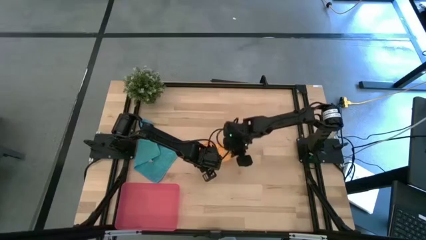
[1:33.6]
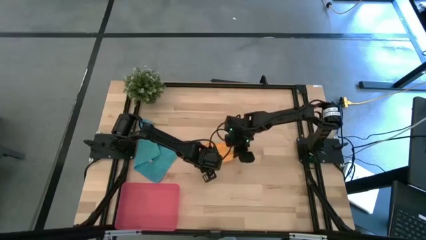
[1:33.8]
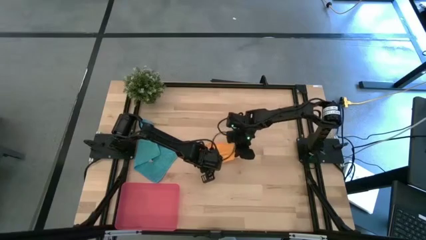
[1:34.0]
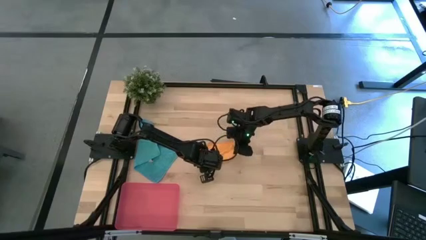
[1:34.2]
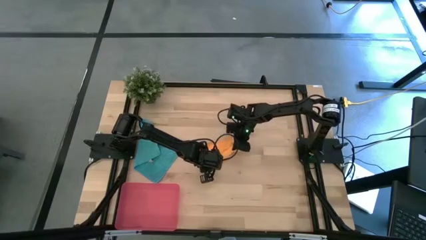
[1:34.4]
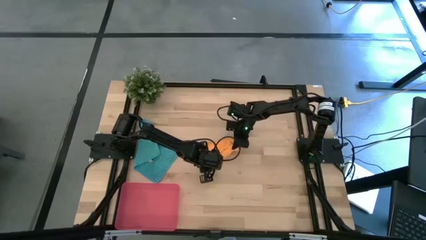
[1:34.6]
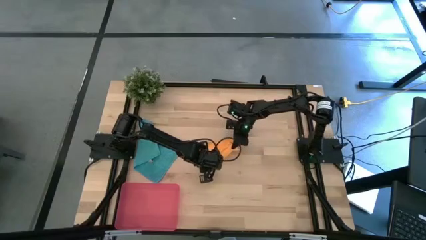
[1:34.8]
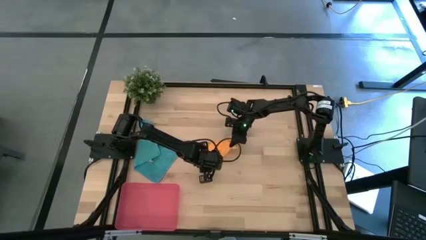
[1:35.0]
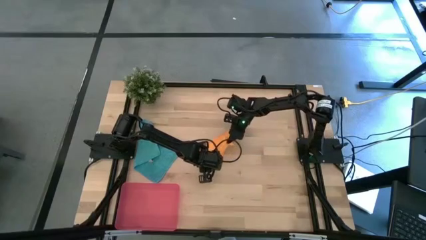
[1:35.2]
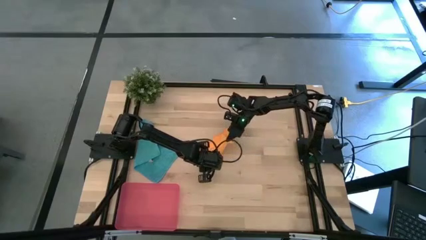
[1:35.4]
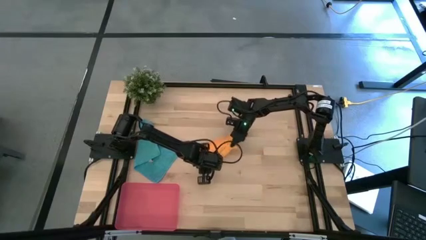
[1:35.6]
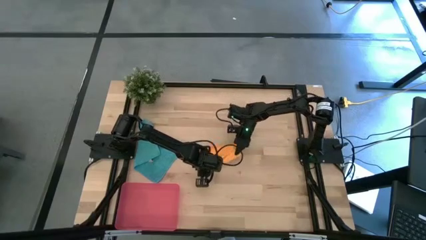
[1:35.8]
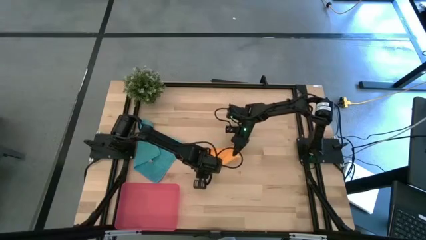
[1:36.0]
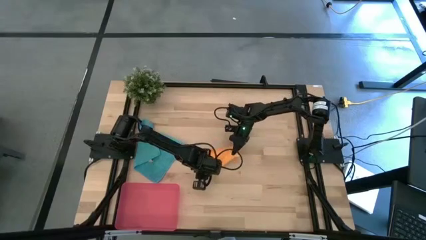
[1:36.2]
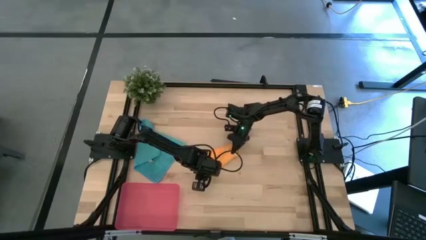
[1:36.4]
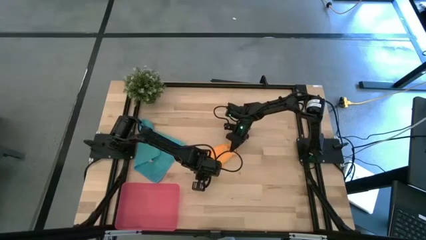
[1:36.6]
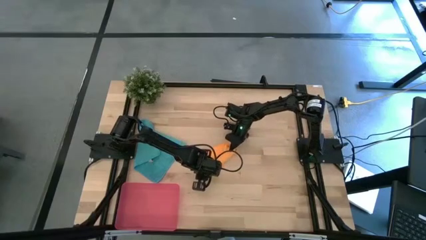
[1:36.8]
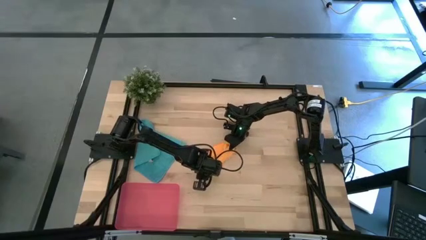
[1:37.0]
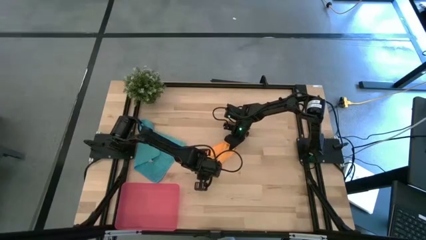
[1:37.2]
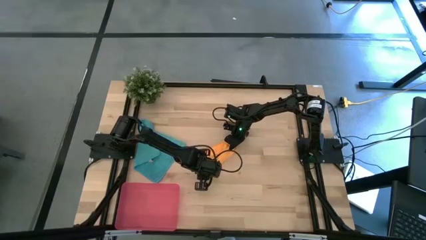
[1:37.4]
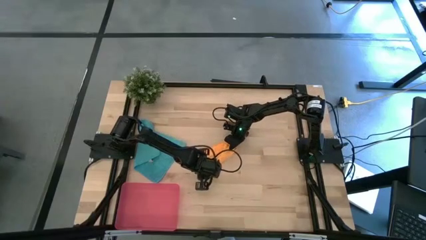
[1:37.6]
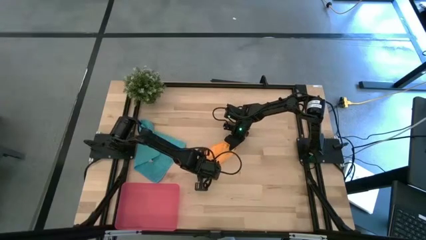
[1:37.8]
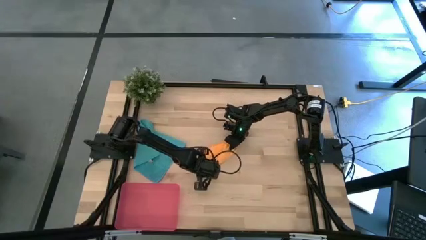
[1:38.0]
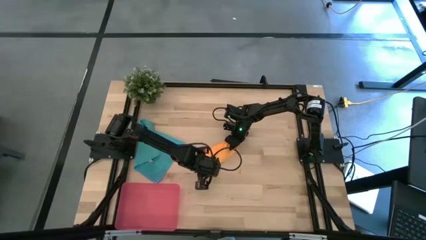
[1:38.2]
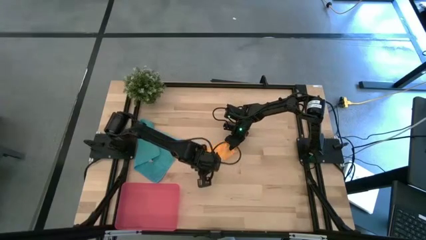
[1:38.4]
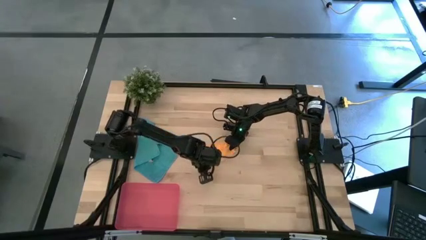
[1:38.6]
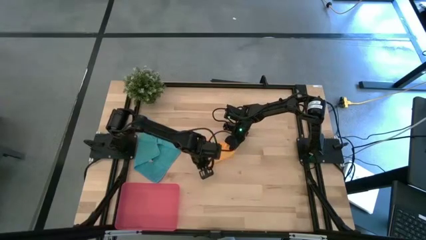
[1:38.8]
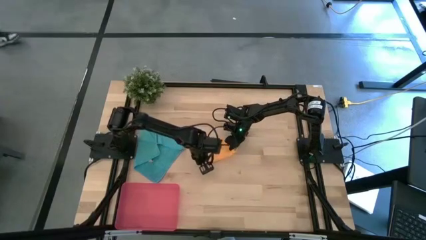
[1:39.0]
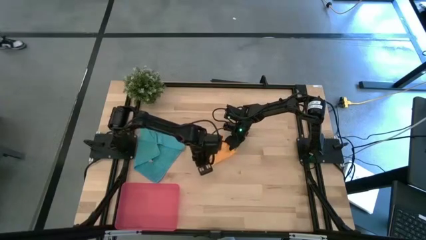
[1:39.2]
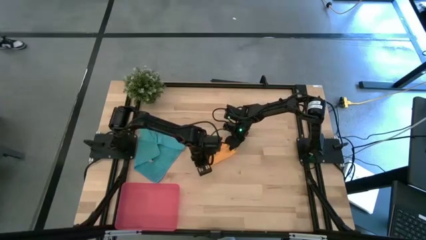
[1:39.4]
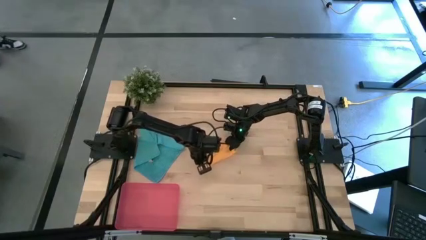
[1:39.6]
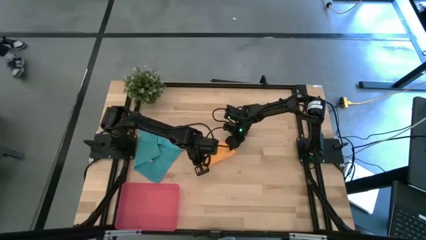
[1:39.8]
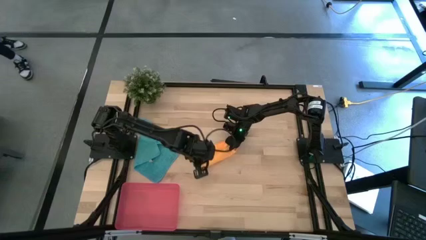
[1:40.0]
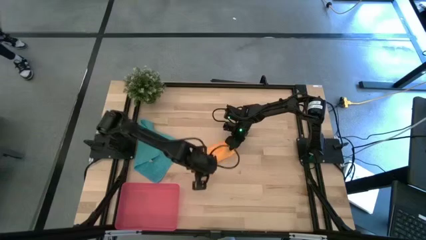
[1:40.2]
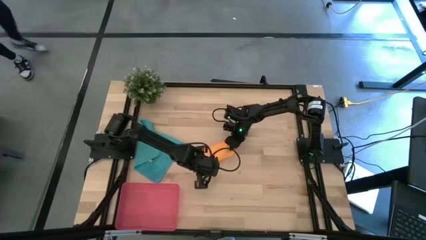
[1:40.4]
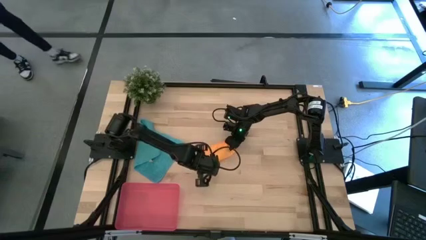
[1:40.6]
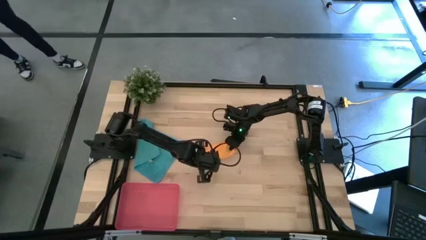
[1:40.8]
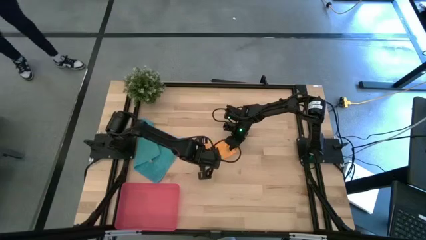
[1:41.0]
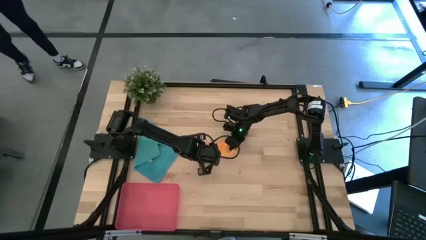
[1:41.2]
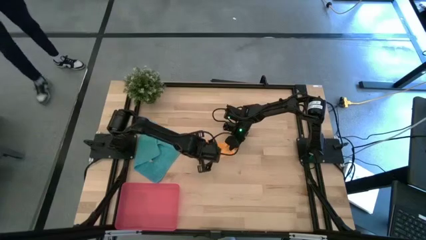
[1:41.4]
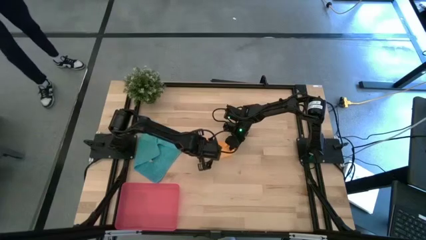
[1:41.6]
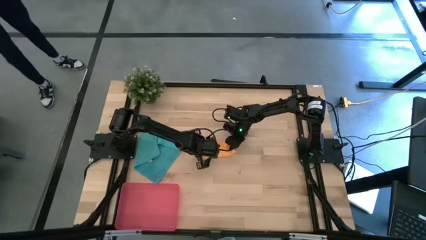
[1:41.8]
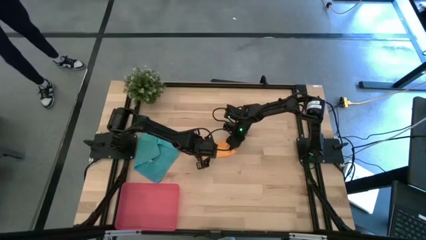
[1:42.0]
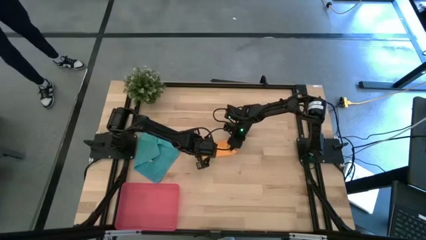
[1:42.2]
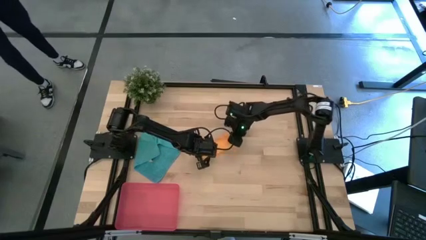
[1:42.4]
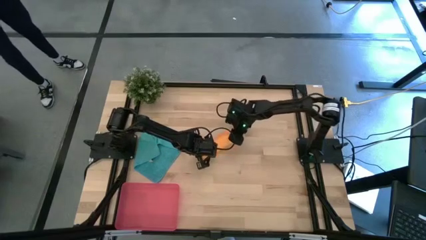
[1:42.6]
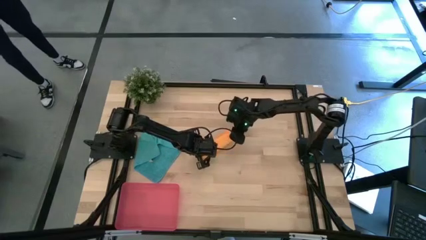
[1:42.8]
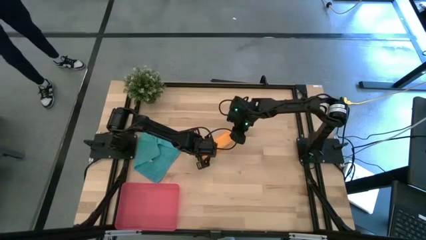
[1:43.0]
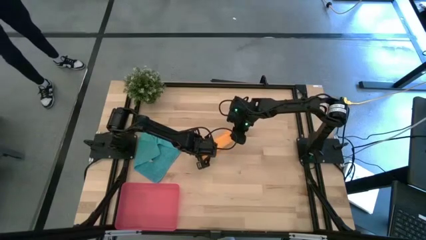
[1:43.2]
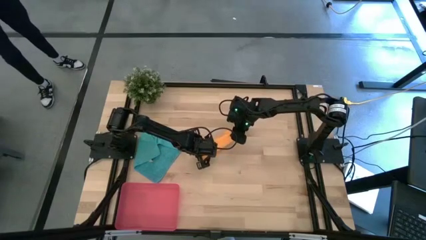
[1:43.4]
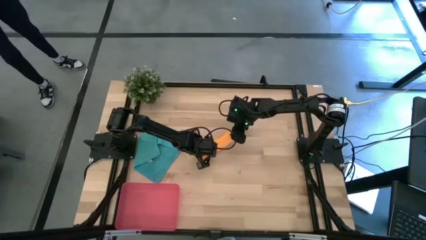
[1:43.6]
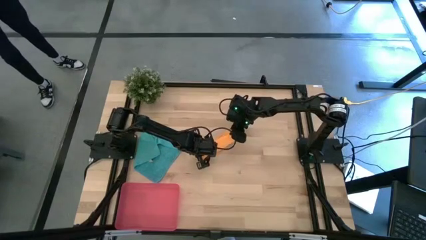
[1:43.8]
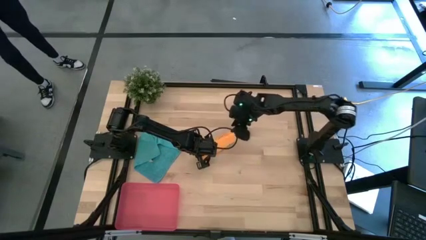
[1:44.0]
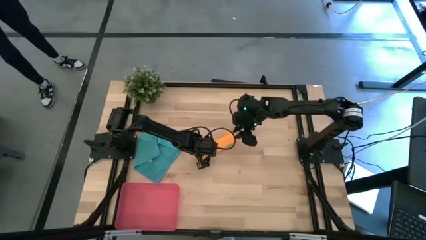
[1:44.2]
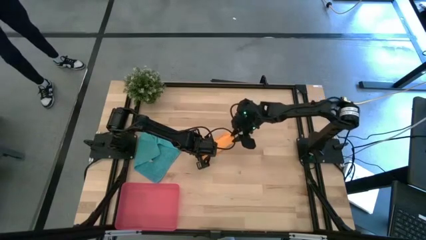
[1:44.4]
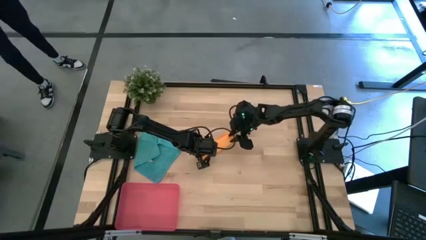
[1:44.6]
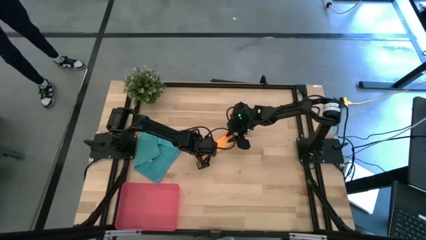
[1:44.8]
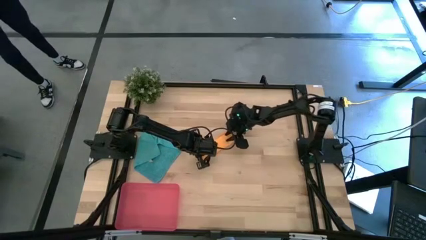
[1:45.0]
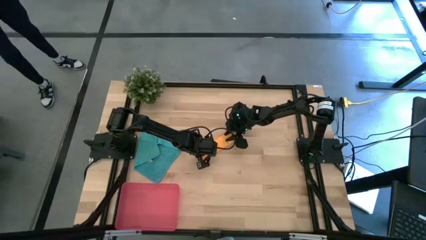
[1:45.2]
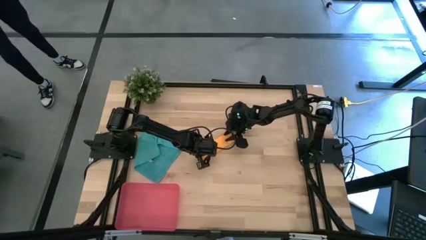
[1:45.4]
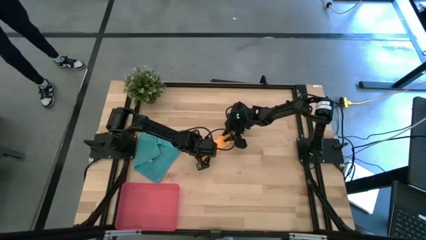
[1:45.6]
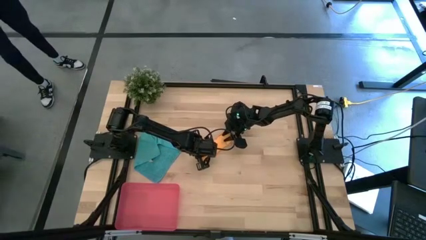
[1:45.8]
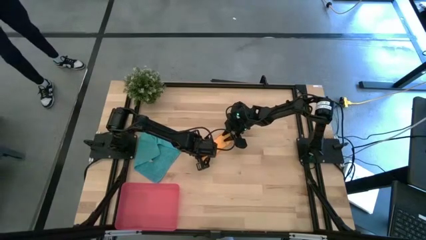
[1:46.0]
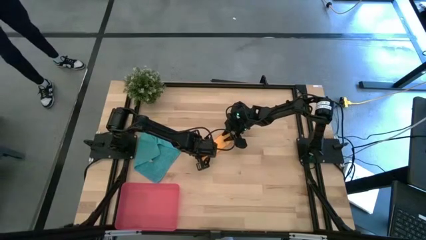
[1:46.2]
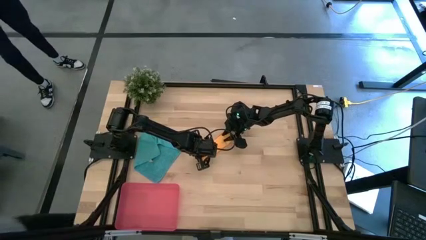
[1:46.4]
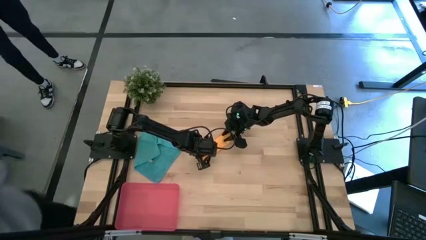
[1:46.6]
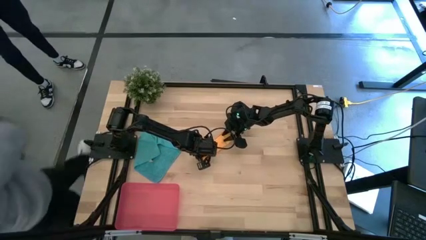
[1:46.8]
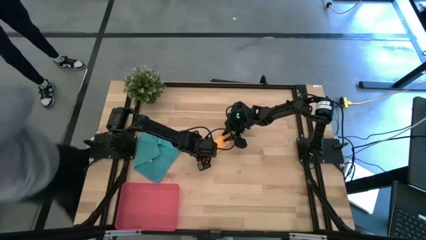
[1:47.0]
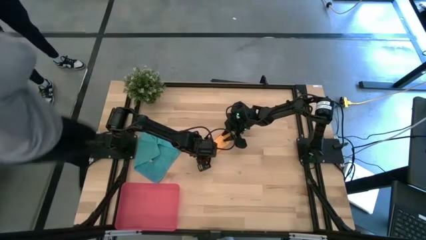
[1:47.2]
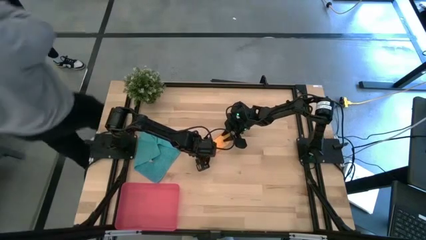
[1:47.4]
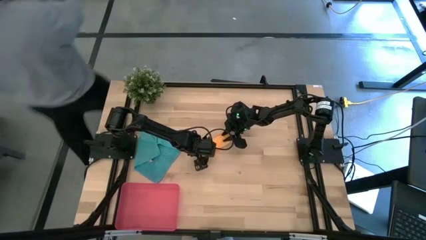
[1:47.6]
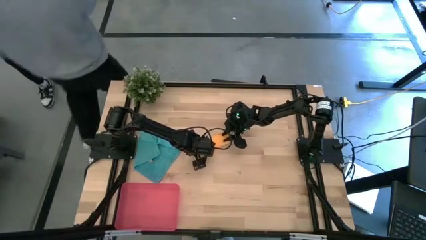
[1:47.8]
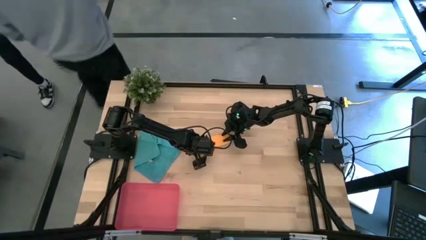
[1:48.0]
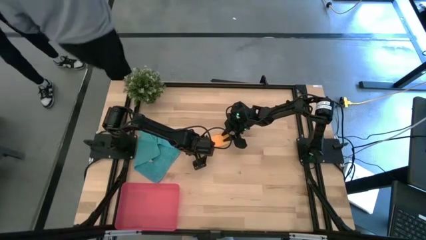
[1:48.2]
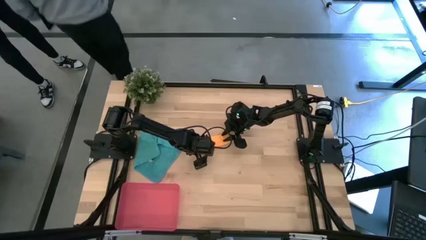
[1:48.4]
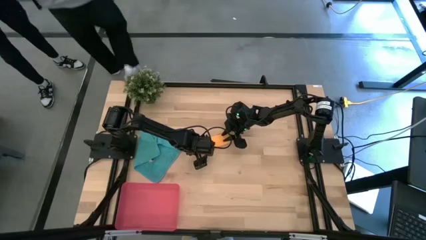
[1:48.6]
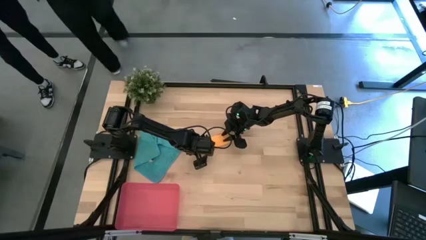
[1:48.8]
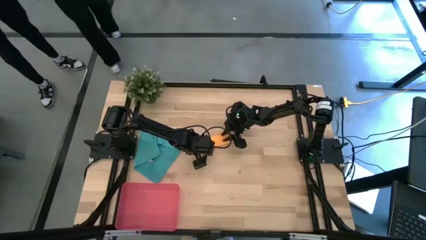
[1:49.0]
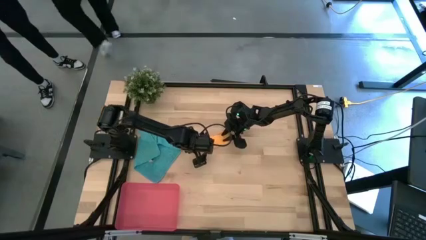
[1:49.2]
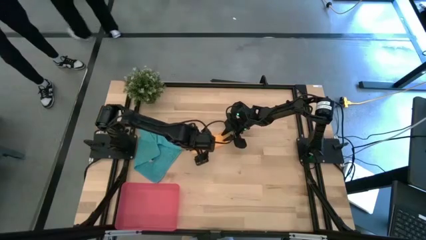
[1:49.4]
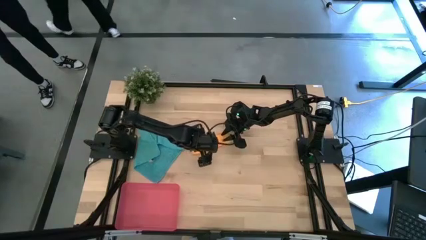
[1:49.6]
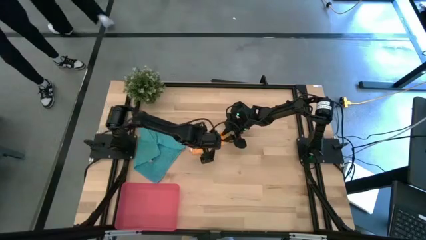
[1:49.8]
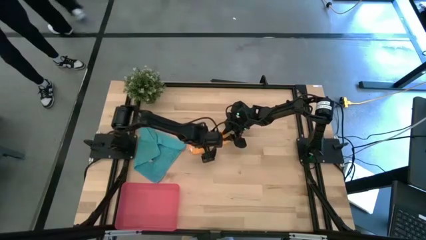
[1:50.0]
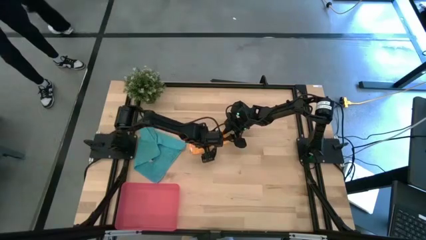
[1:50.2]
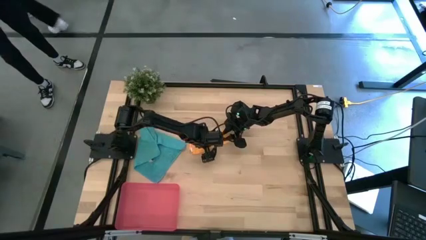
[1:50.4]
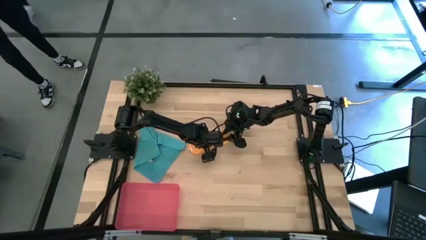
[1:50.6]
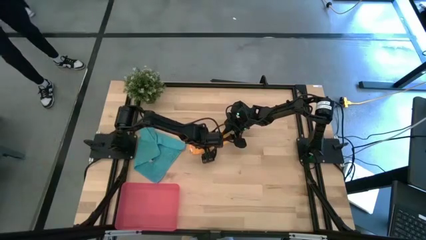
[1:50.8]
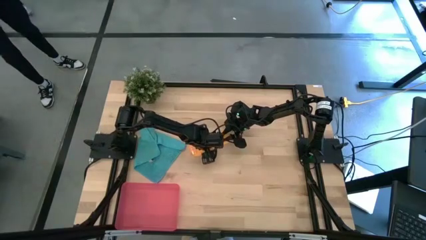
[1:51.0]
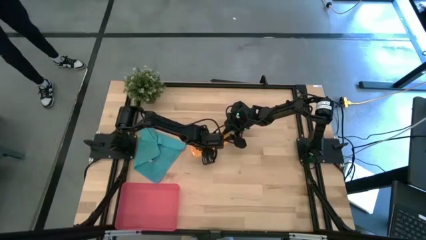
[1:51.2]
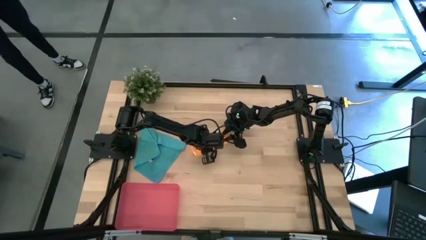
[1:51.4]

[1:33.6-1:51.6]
Task: Roll microfiber towels into tight, uniform cylinder then place into a basket
Roll the yellow microfiber cloth
